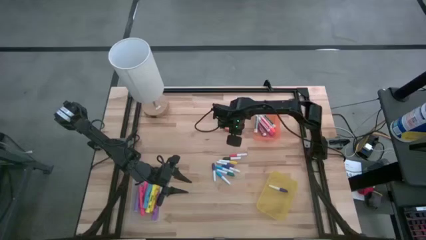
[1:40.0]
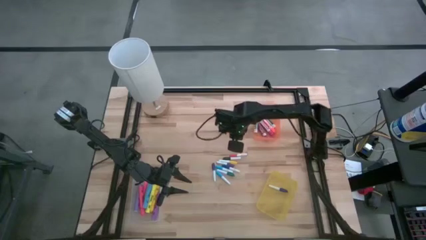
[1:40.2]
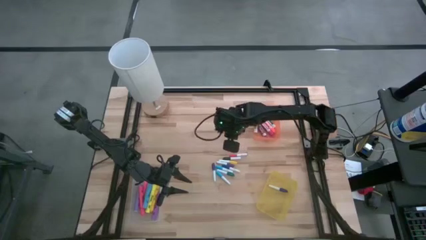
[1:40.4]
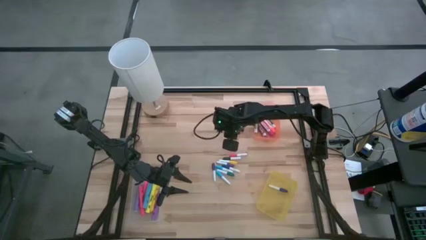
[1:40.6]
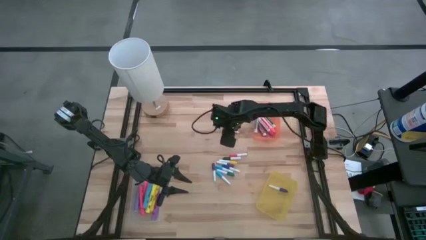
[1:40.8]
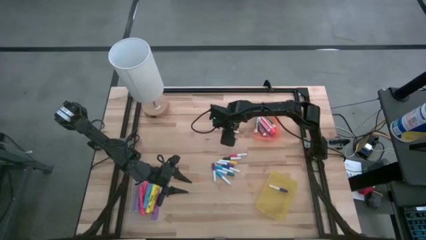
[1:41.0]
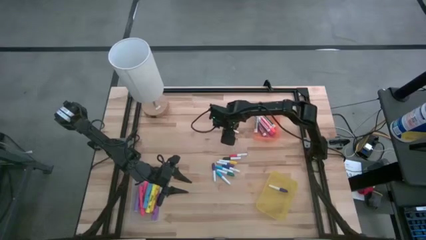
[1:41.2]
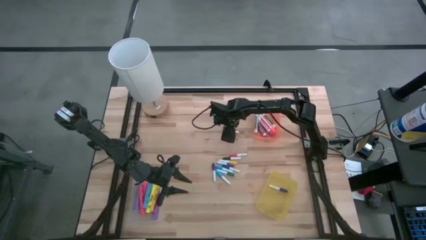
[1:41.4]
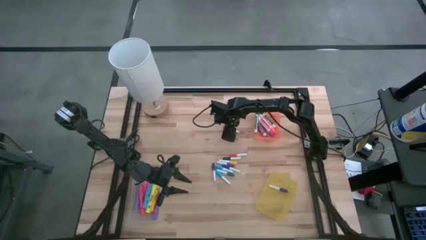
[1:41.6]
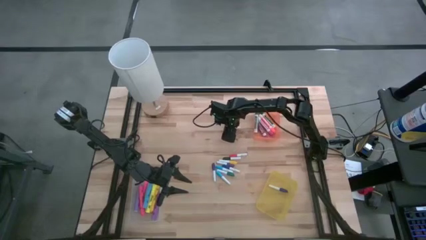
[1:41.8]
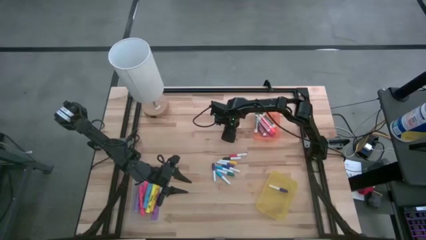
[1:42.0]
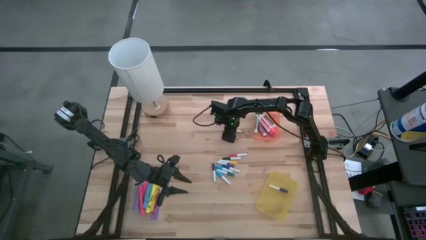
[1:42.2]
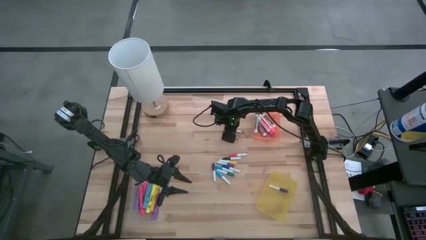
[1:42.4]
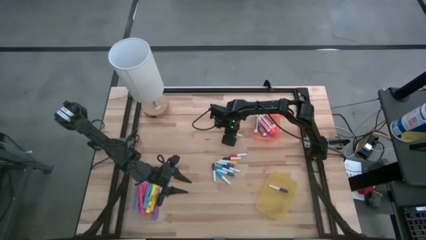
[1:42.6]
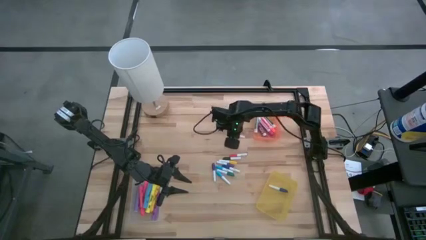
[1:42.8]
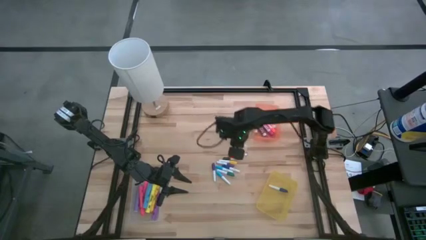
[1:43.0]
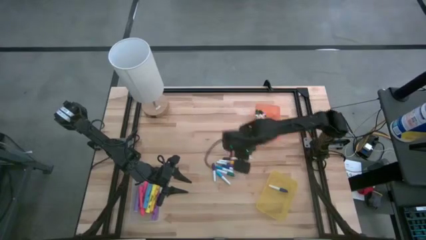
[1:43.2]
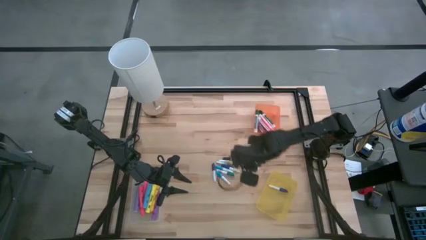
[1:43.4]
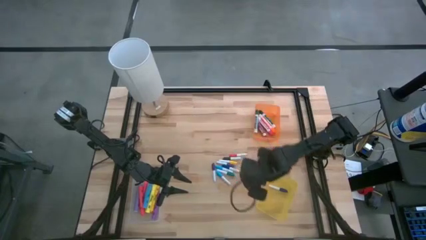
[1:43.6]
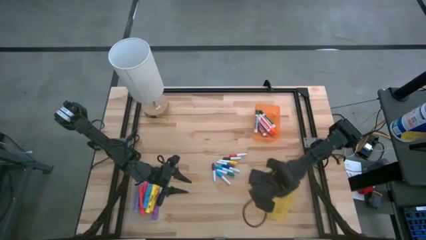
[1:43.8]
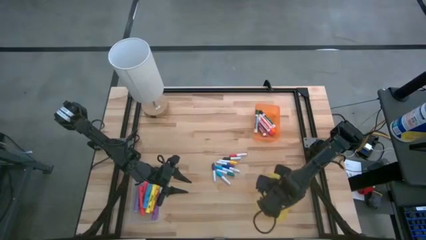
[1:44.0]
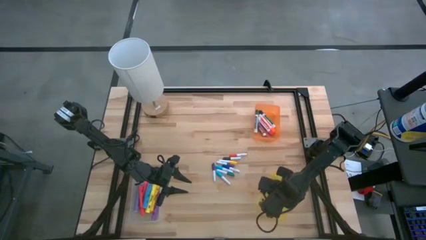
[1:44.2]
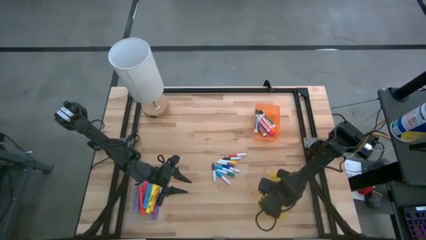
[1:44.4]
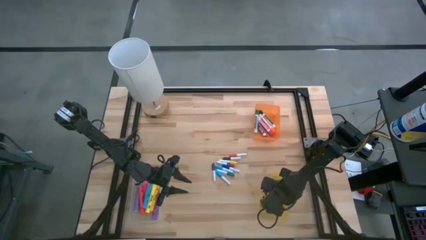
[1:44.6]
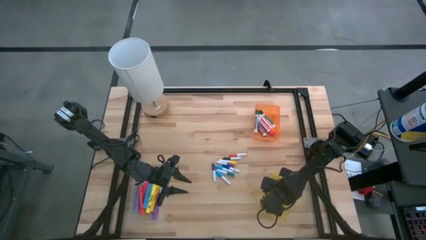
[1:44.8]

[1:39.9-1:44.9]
Task: Pick & Place Markers
Put the orange highlighter pen into the yellow bin

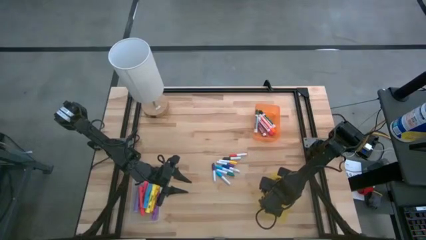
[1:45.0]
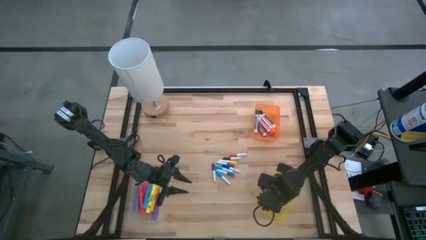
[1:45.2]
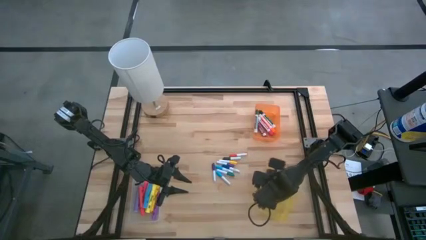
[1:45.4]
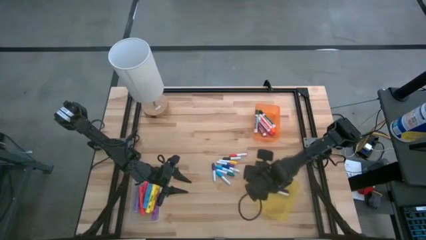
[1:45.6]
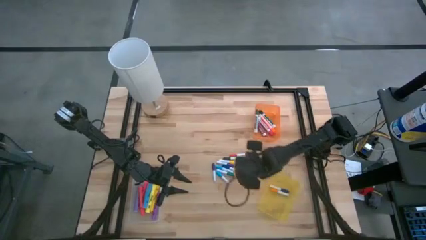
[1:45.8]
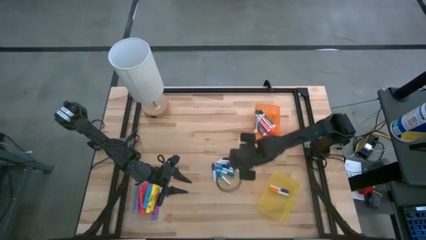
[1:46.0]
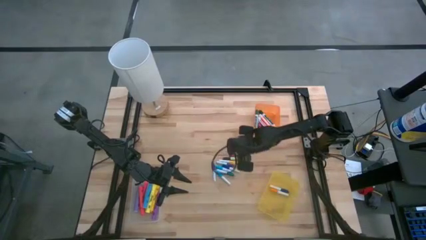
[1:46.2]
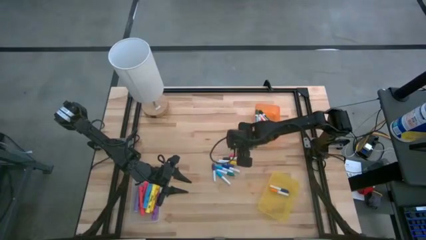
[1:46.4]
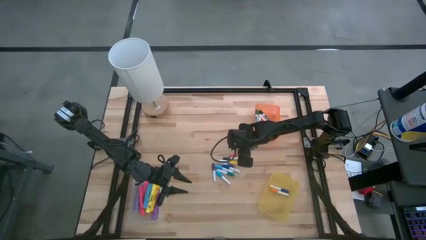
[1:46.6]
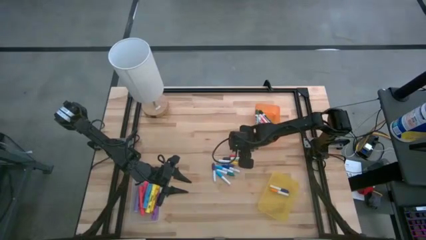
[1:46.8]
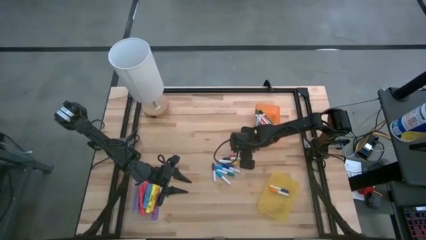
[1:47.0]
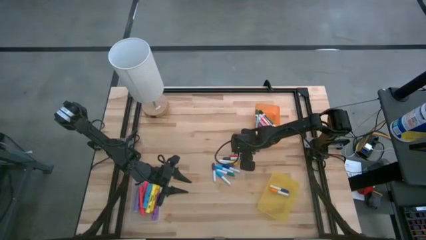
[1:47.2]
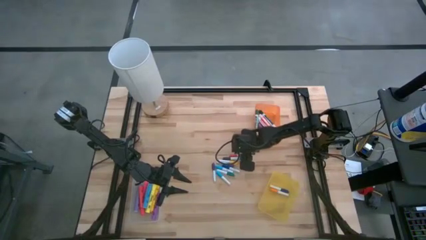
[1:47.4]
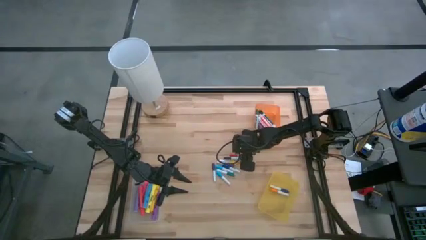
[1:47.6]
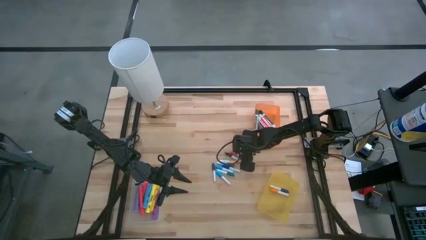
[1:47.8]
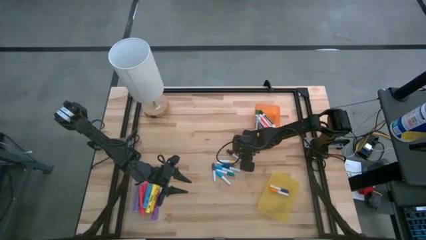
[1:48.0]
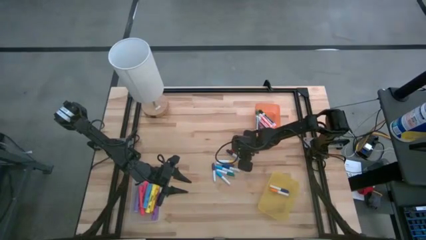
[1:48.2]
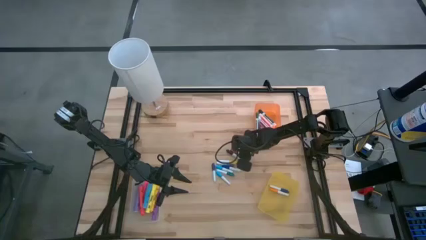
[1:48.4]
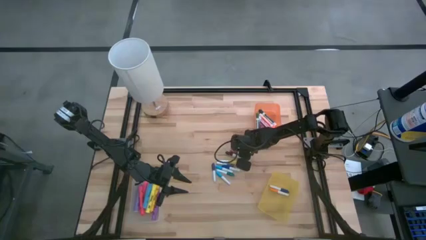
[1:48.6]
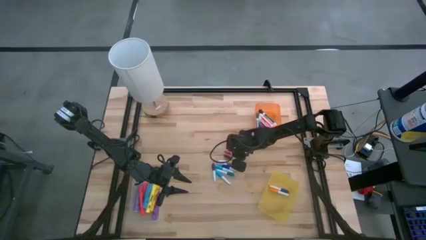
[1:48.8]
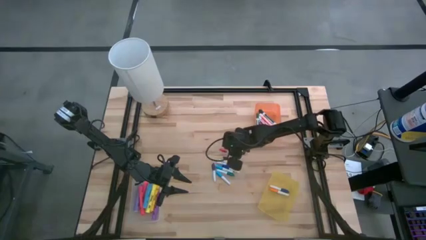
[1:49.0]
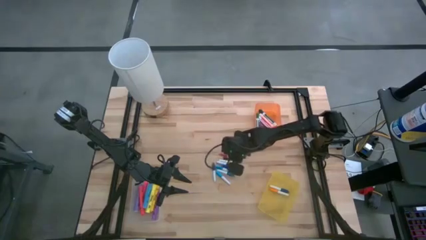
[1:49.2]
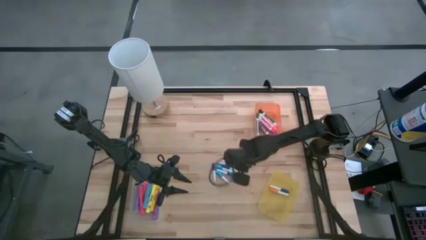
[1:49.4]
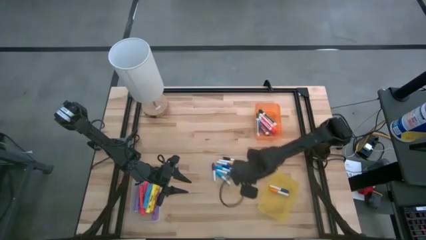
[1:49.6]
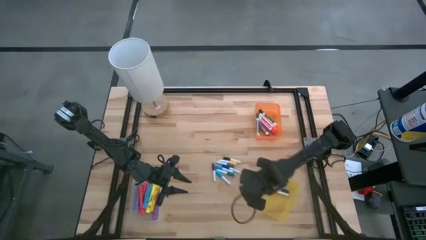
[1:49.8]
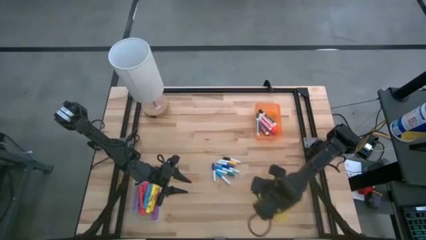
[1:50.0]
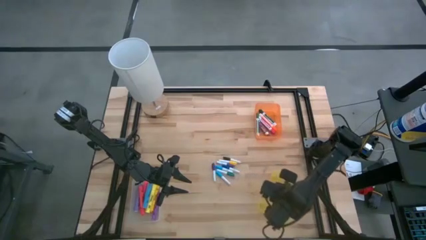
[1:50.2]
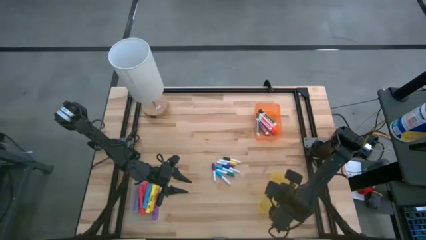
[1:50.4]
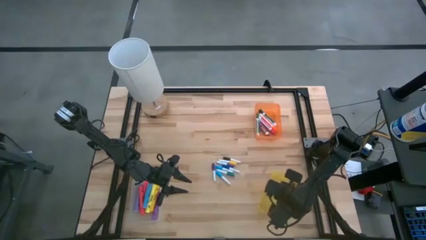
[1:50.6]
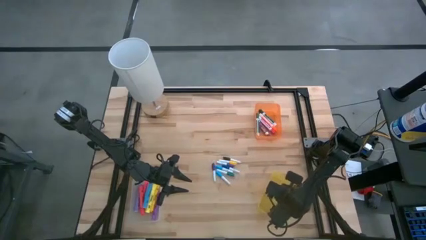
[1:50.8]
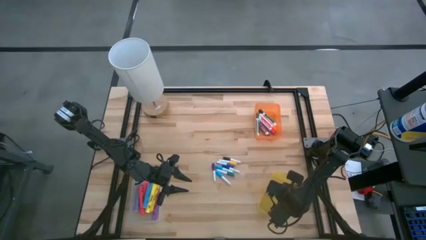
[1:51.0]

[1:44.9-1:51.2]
Put the red highlighter pen into the yellow bin

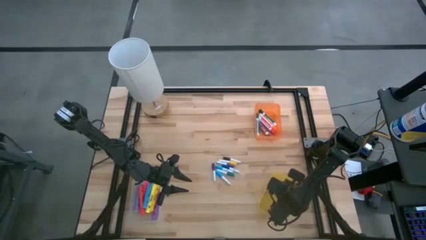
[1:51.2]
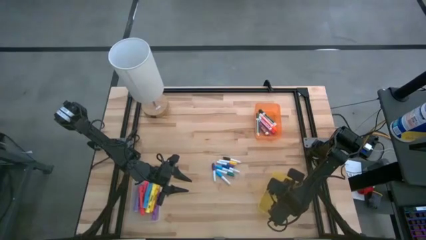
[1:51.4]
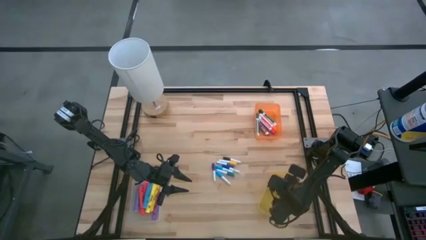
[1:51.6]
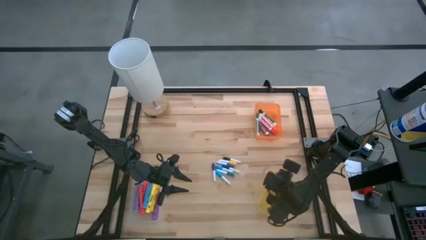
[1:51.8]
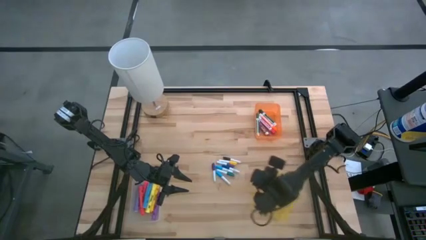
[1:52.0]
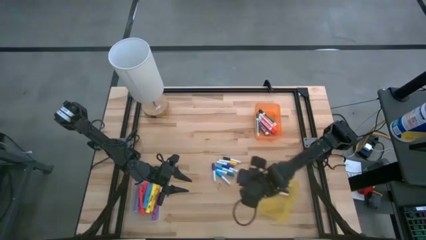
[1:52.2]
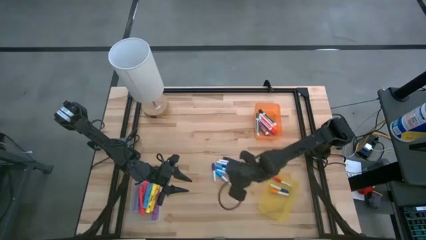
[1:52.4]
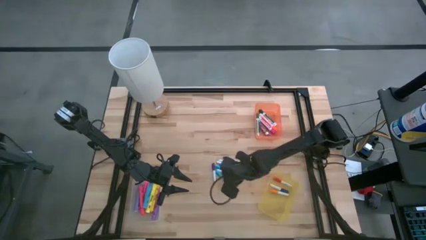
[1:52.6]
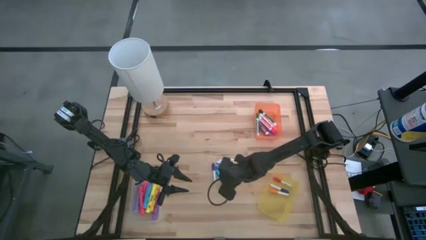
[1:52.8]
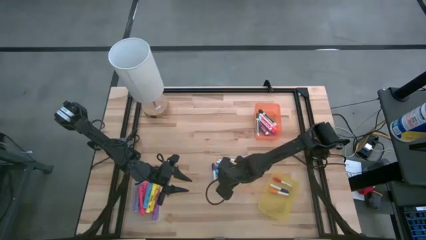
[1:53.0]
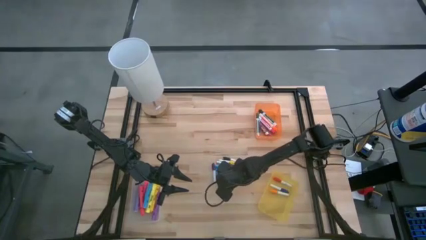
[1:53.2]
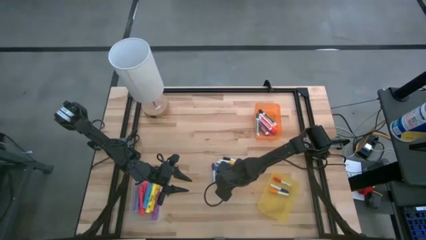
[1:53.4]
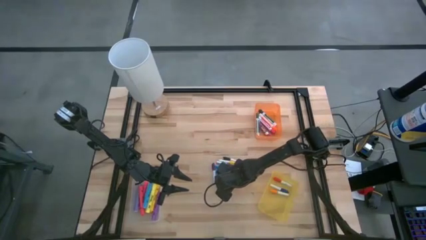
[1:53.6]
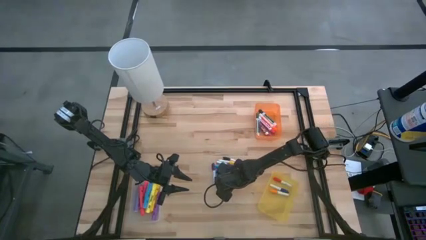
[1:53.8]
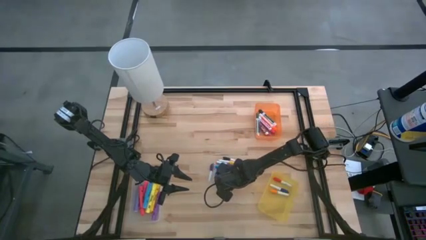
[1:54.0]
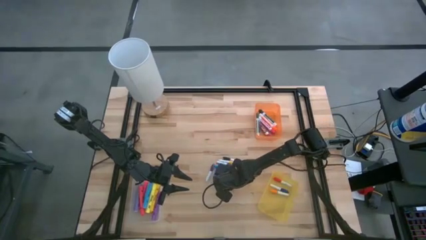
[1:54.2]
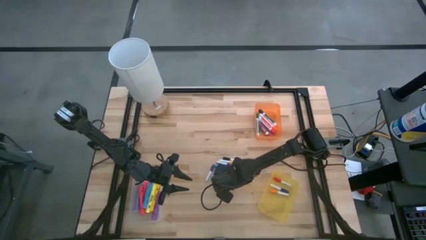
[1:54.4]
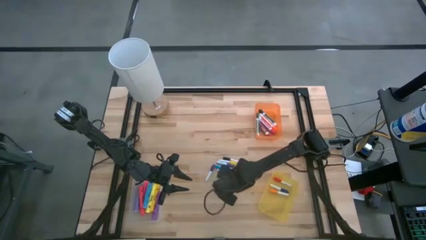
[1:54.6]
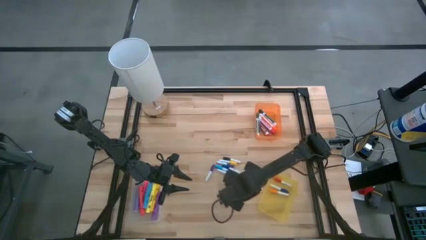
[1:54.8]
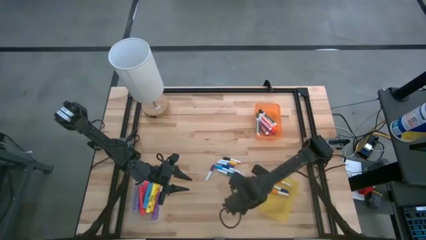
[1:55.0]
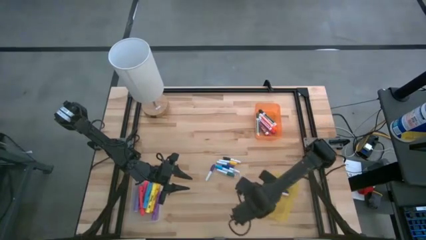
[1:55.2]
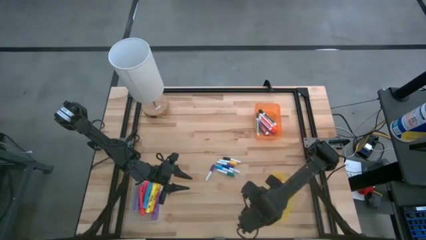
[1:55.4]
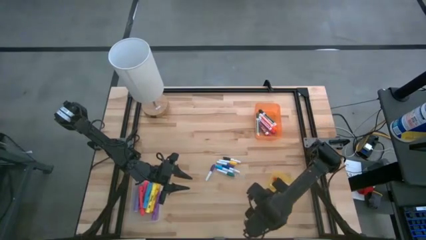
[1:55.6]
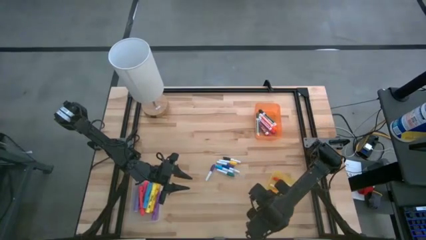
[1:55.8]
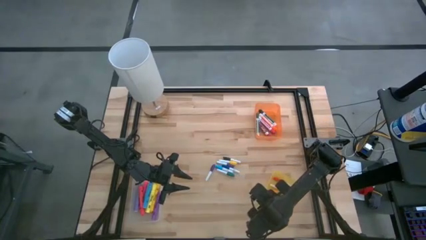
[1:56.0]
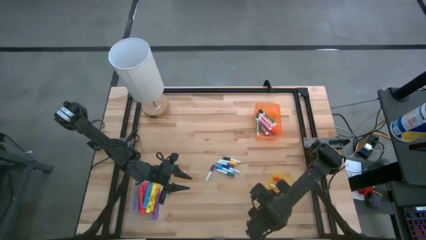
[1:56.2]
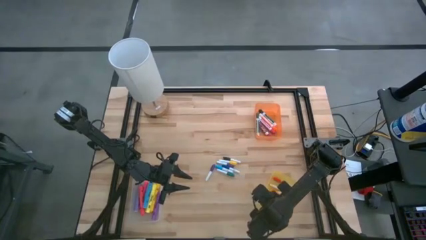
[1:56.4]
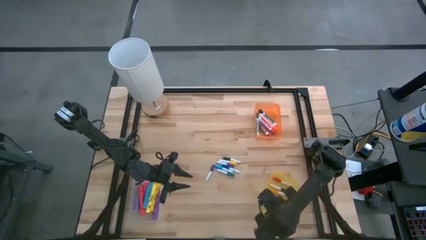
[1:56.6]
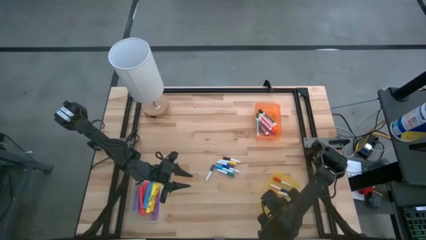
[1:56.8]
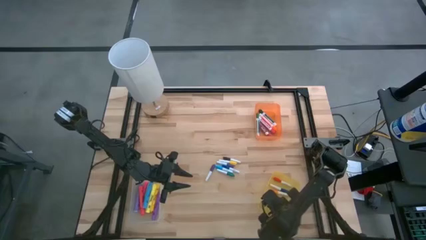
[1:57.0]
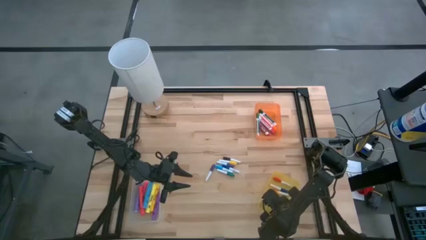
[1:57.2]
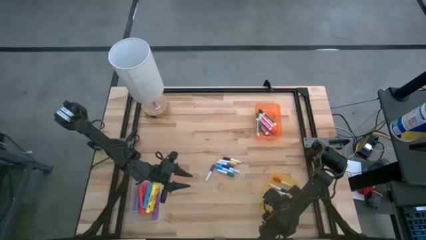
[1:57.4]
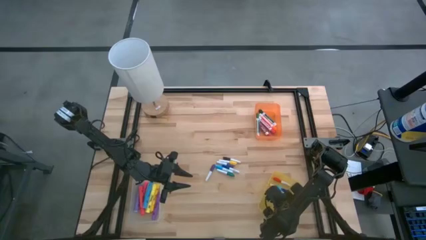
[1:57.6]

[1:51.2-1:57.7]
Put the blue highlighter pen into the yellow bin
